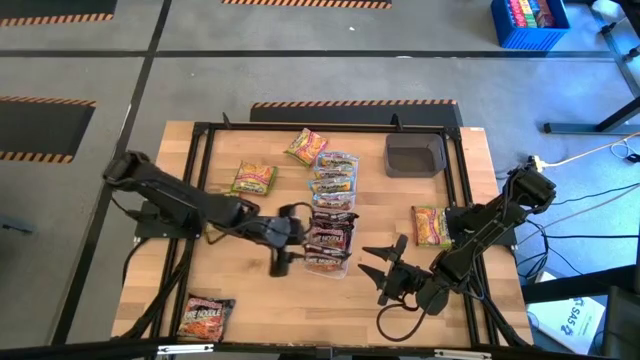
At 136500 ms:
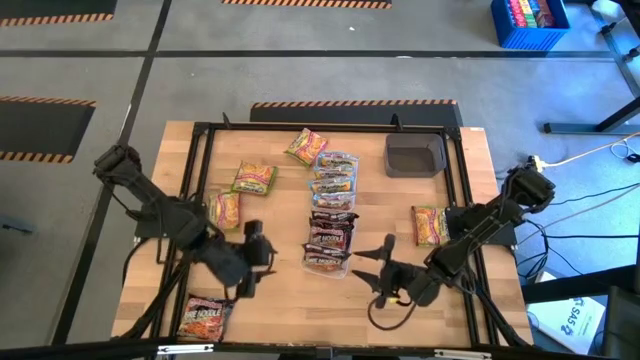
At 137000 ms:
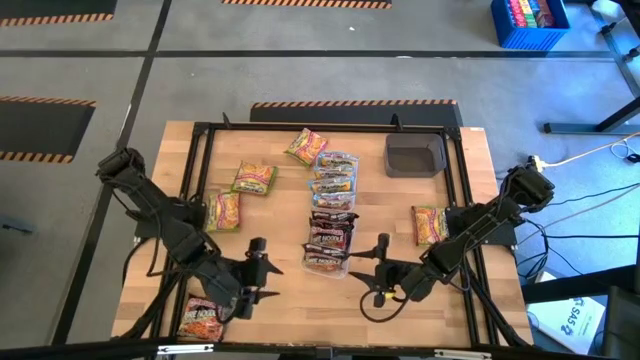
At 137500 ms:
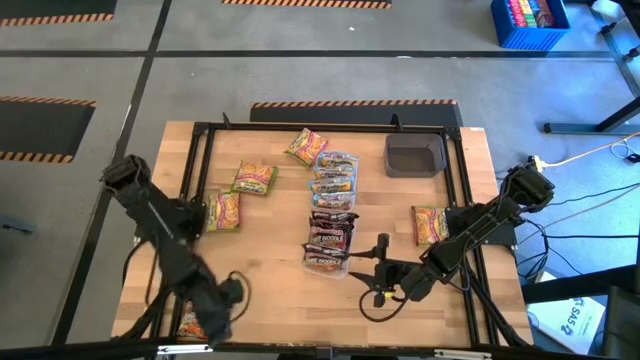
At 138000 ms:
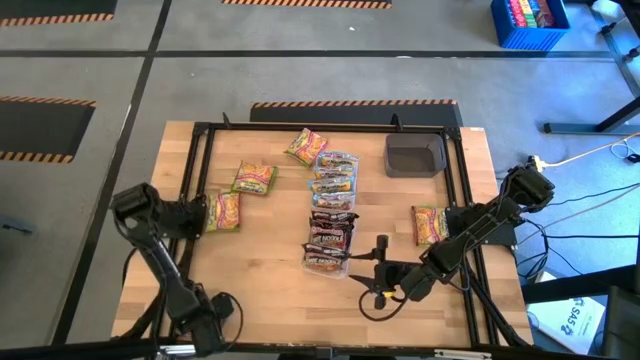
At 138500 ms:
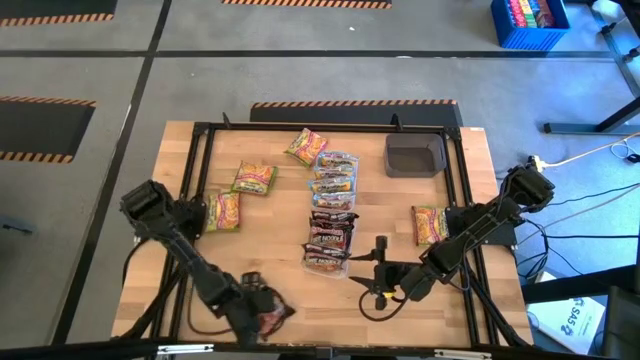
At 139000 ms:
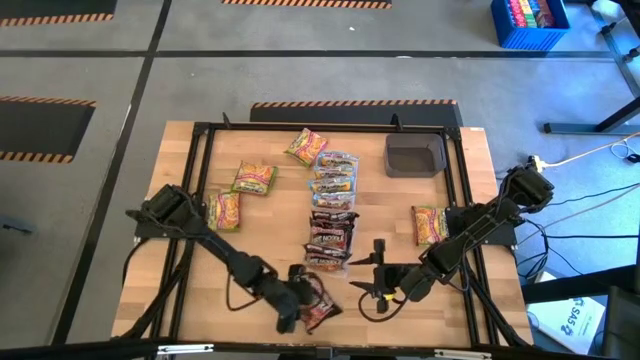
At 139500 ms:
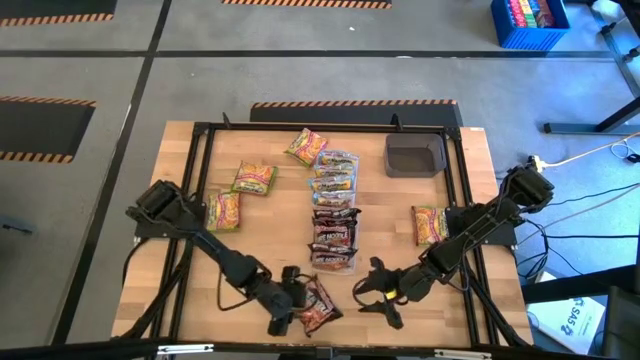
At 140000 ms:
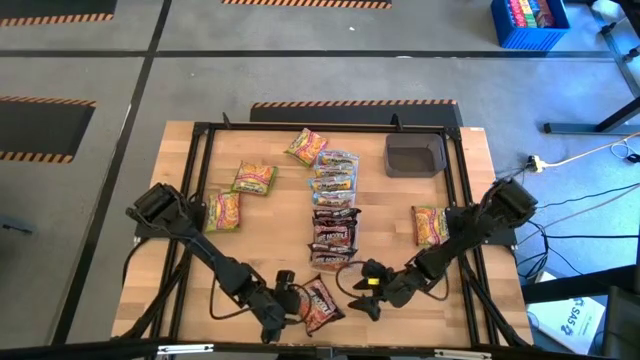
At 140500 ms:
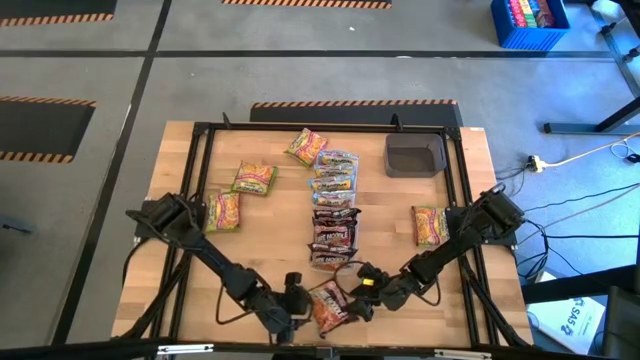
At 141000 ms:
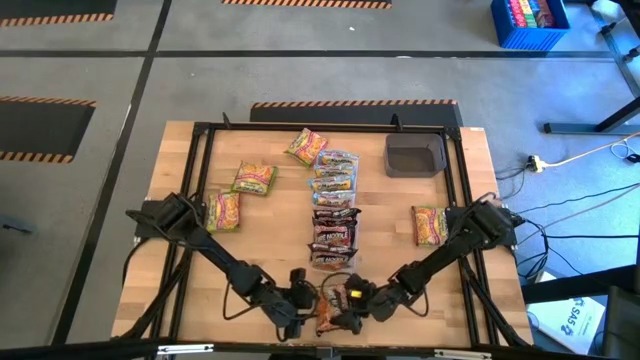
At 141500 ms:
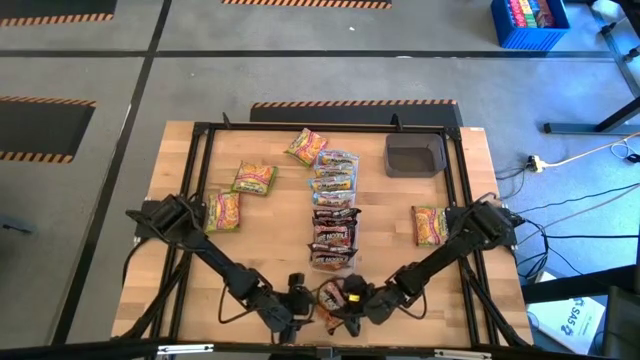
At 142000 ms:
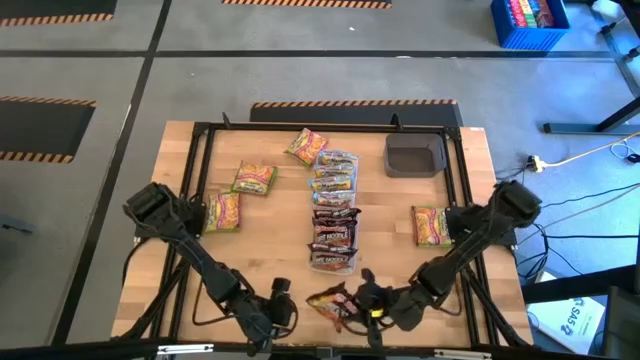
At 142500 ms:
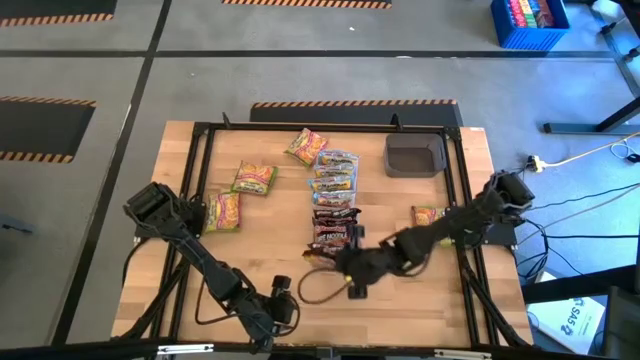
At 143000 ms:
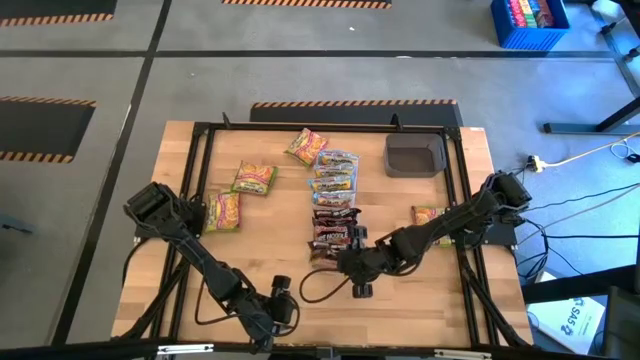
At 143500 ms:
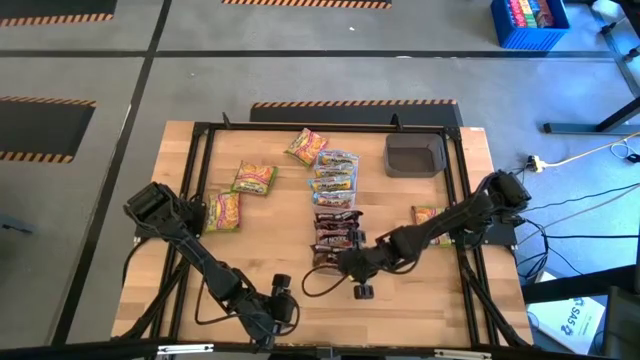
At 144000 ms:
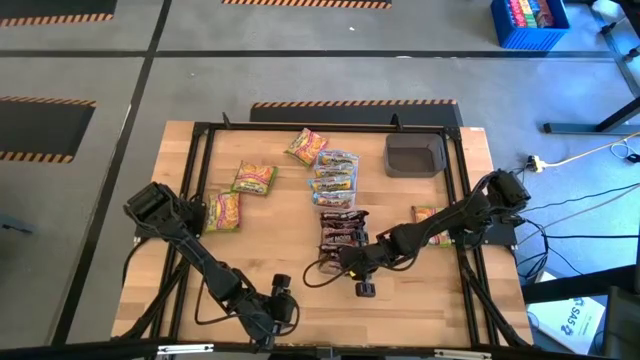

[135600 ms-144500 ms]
Task: Sort Maruchan noodles
Put the black noodle pack into the bottom transparent bin

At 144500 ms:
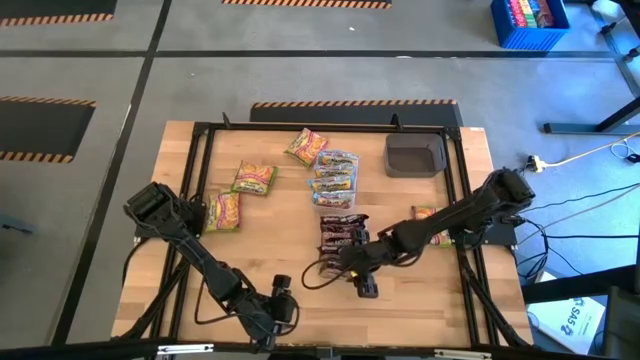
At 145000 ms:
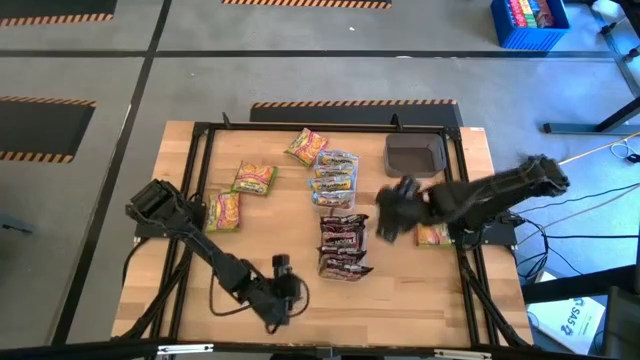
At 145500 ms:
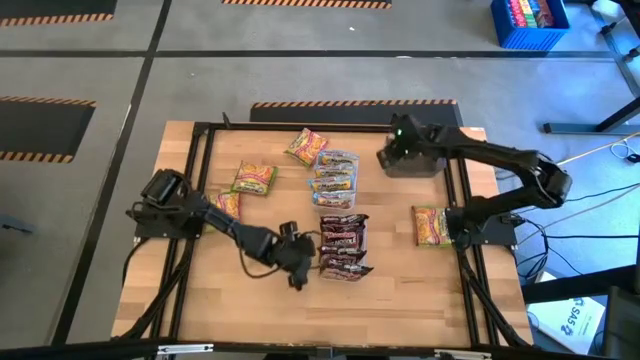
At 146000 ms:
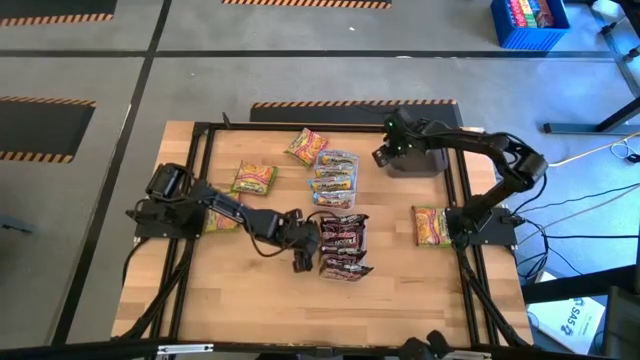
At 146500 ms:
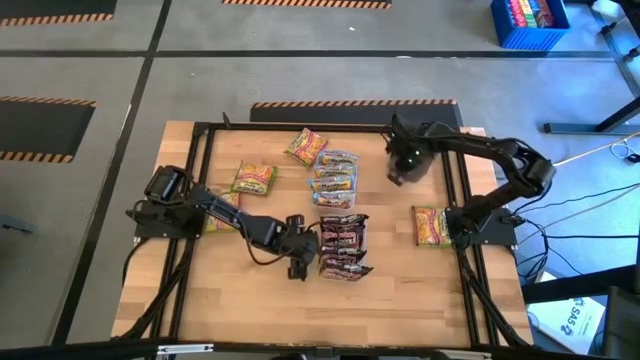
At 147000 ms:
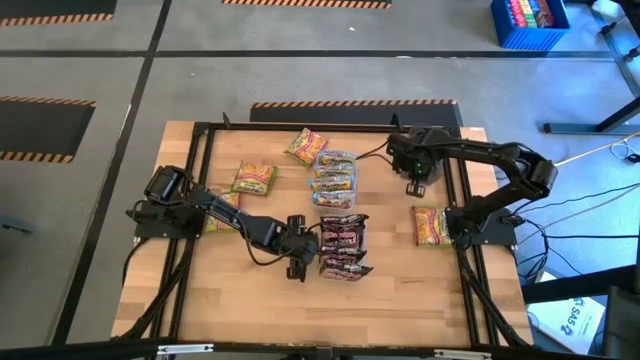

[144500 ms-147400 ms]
Adjust the black bin

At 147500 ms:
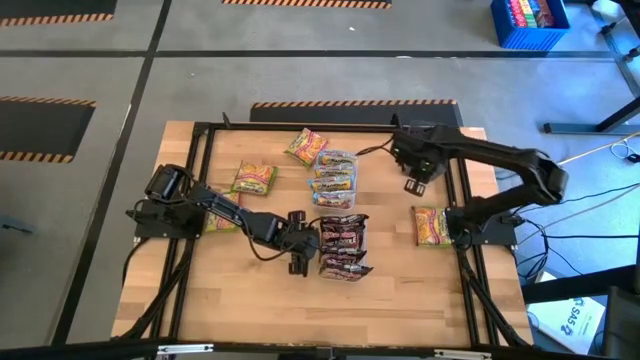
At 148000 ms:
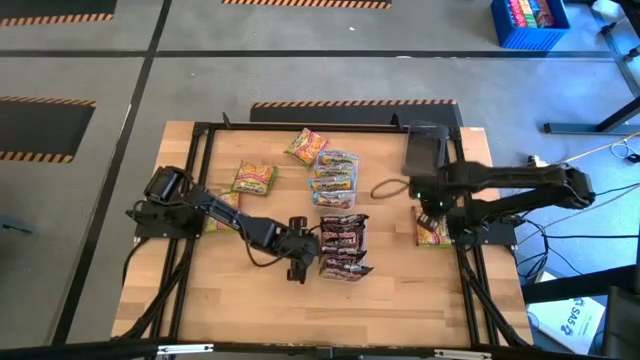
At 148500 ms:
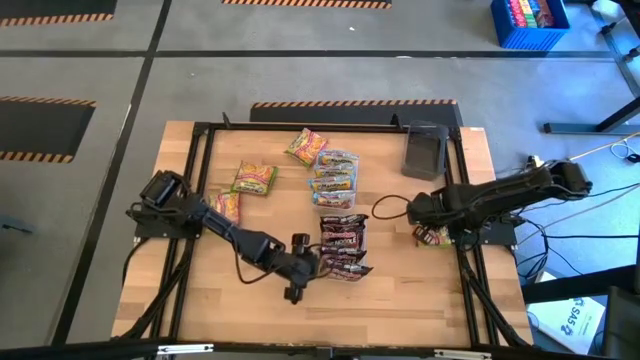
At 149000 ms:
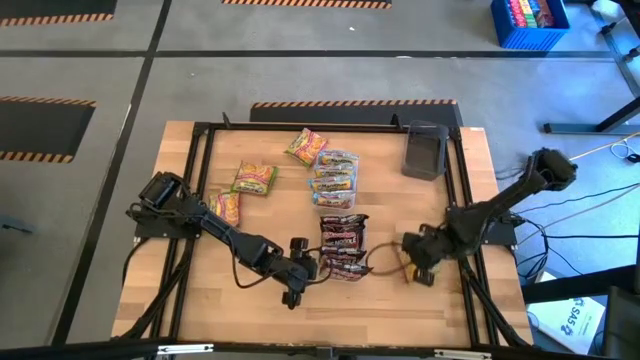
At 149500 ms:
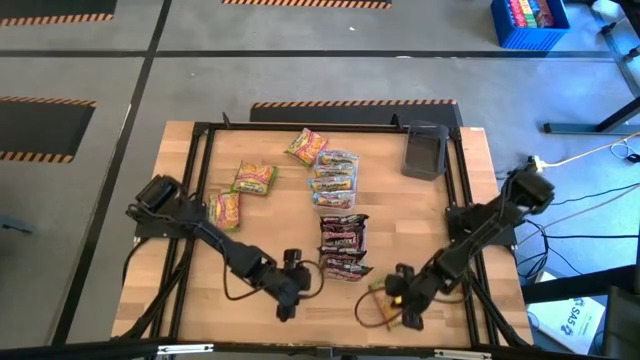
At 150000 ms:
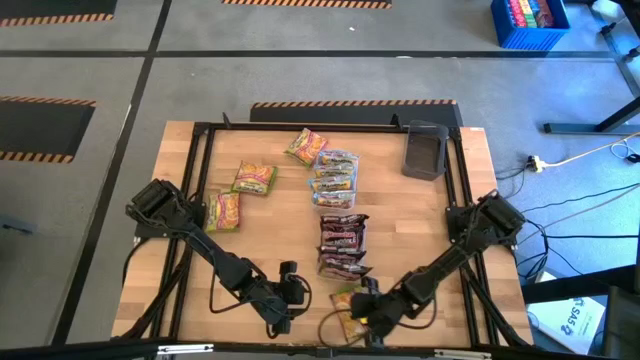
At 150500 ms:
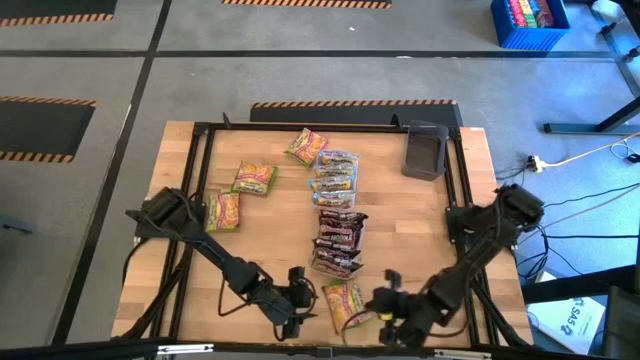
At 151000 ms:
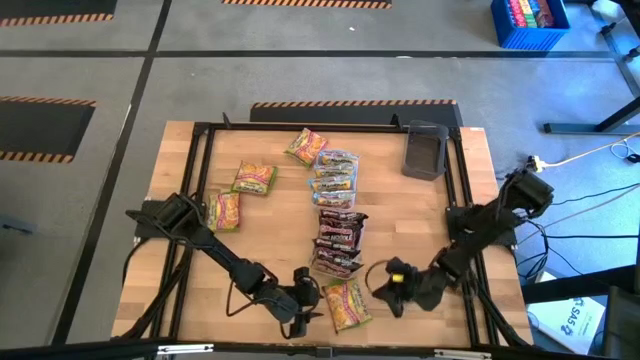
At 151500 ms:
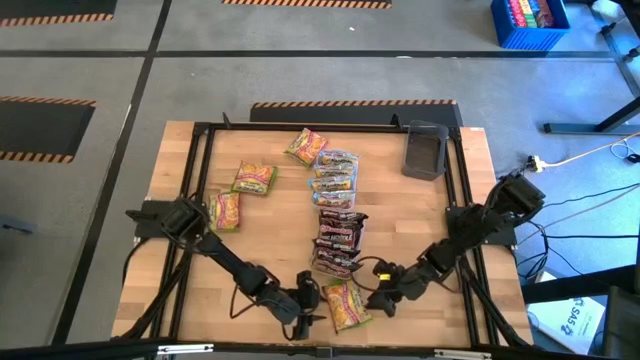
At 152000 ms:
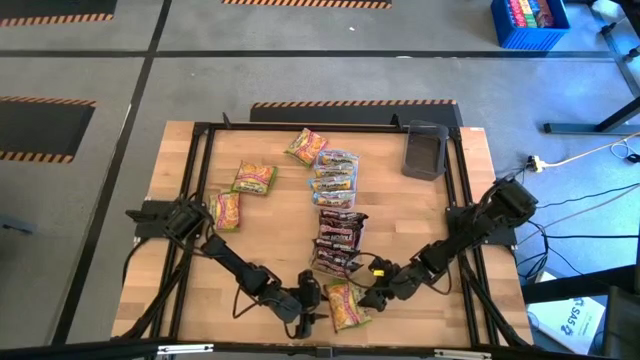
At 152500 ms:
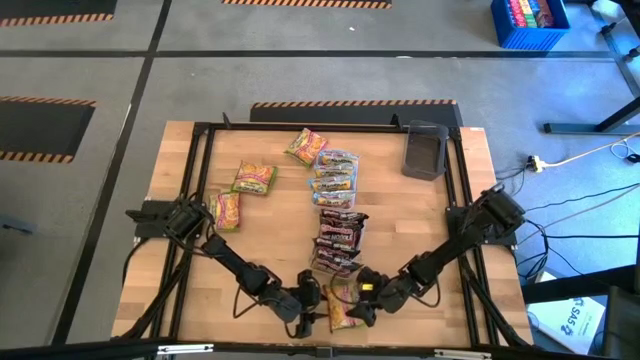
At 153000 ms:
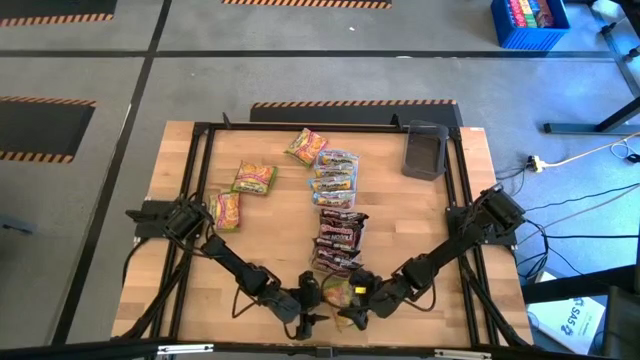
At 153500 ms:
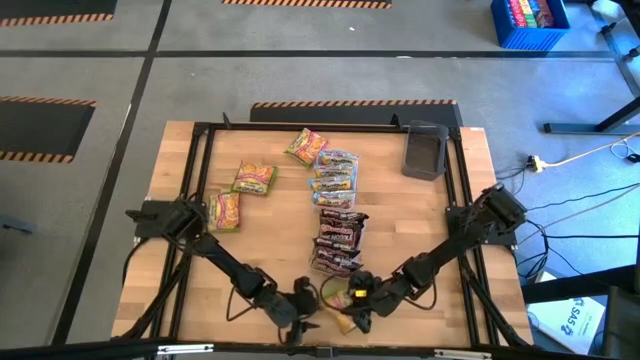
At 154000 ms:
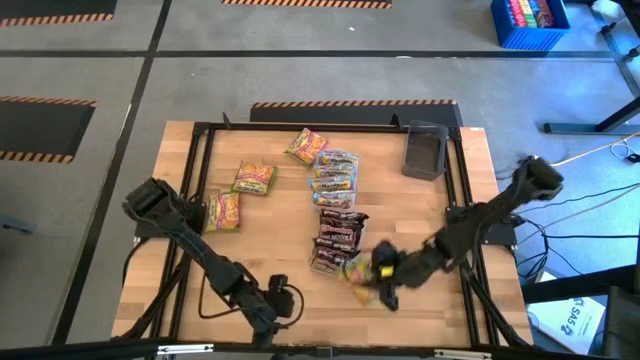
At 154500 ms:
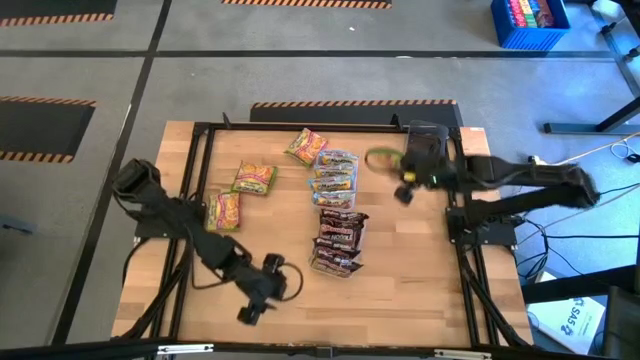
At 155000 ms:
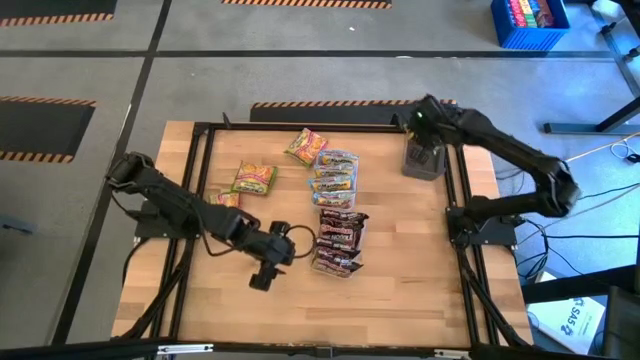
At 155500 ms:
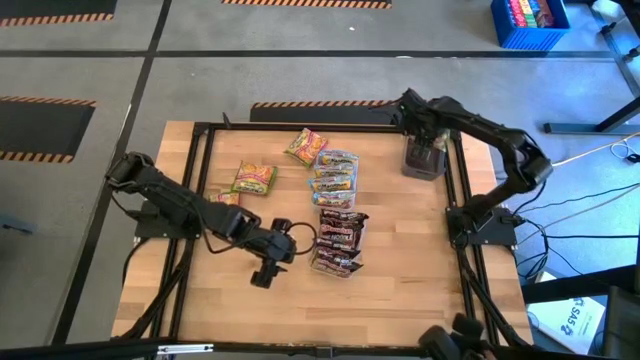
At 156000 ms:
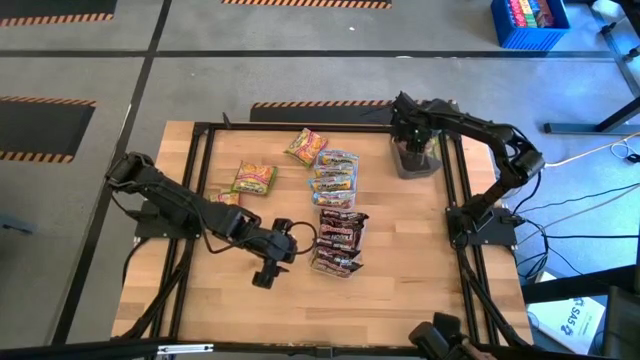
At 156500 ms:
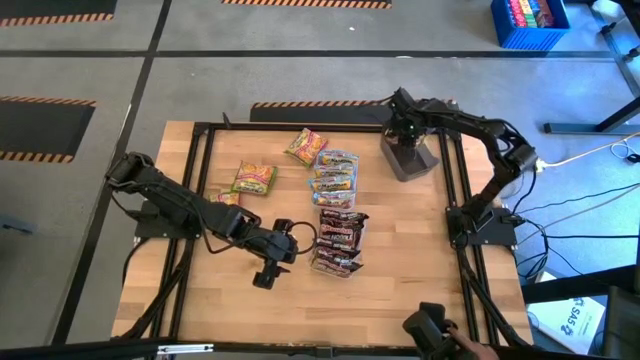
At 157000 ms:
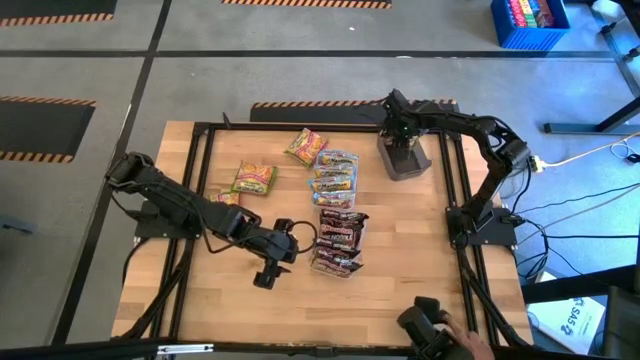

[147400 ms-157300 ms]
Put the green noodle pack into the black bin
